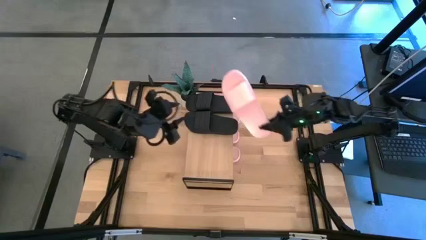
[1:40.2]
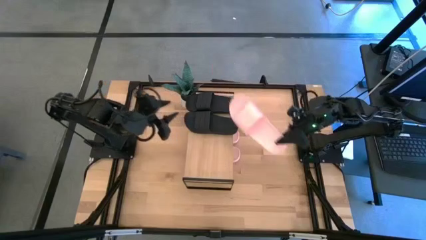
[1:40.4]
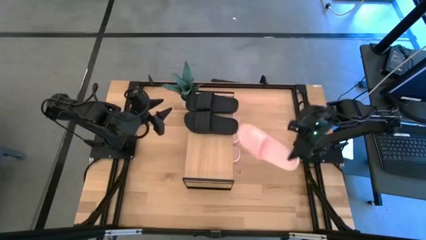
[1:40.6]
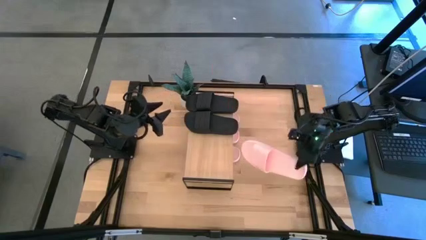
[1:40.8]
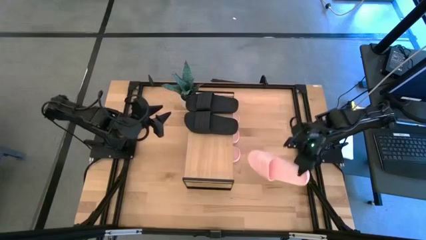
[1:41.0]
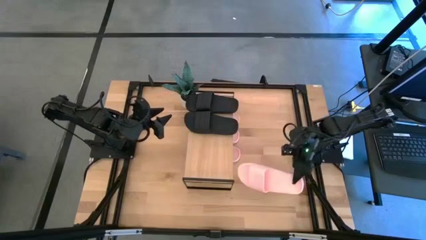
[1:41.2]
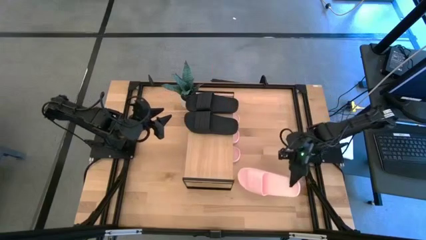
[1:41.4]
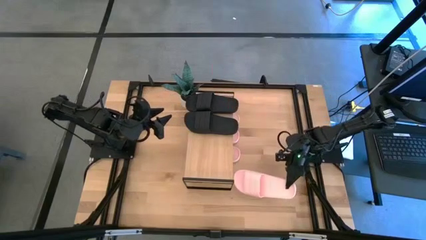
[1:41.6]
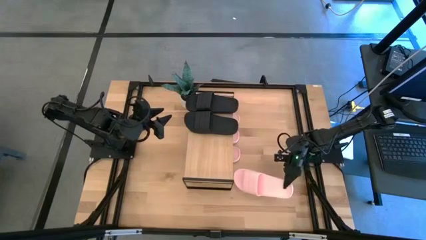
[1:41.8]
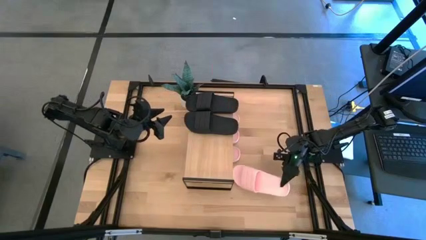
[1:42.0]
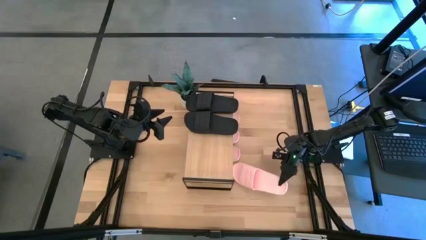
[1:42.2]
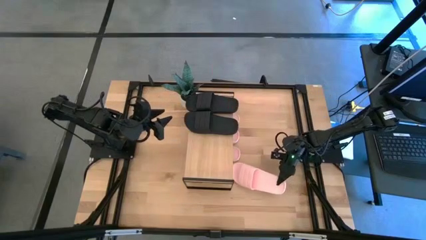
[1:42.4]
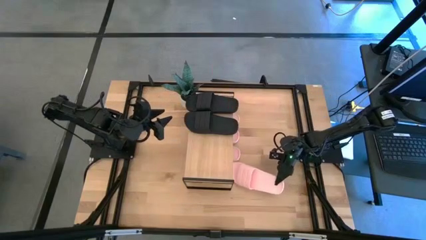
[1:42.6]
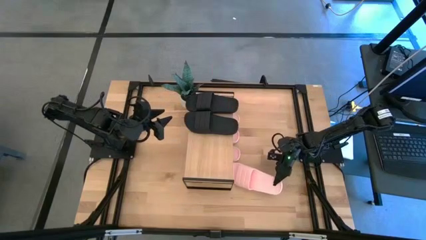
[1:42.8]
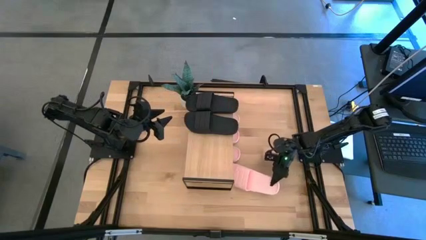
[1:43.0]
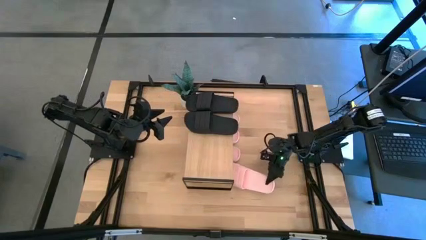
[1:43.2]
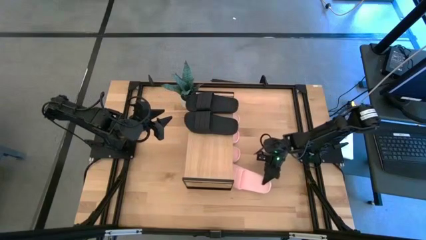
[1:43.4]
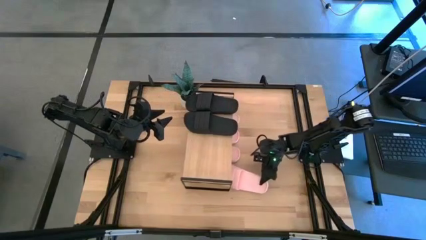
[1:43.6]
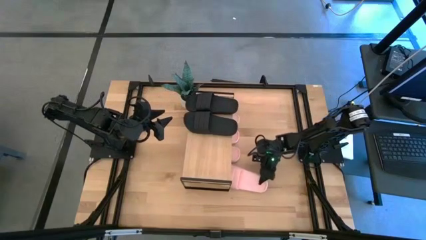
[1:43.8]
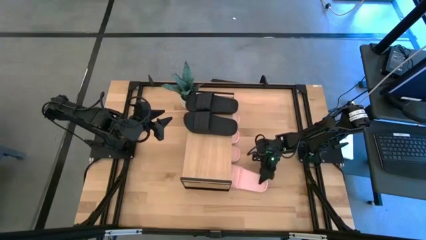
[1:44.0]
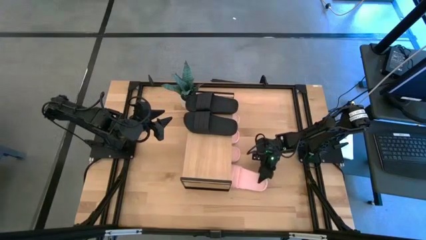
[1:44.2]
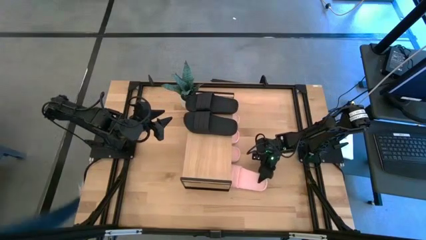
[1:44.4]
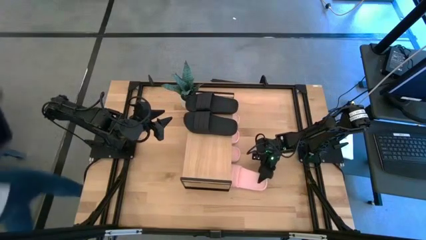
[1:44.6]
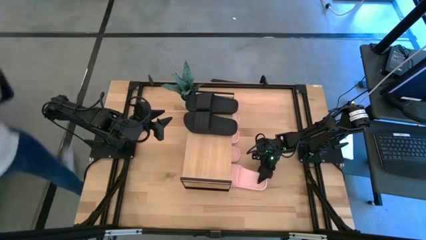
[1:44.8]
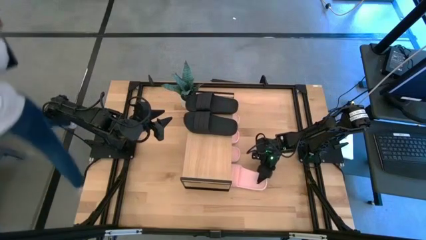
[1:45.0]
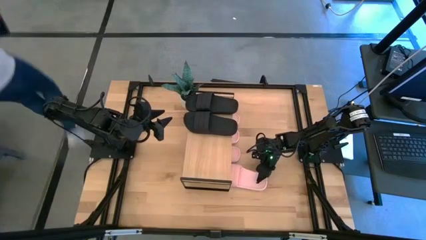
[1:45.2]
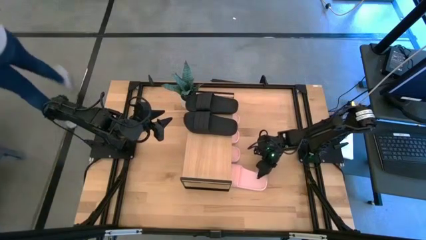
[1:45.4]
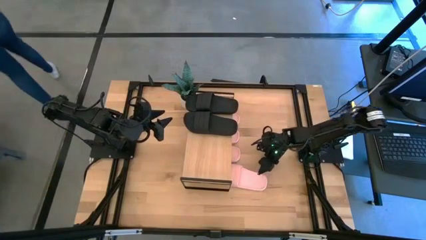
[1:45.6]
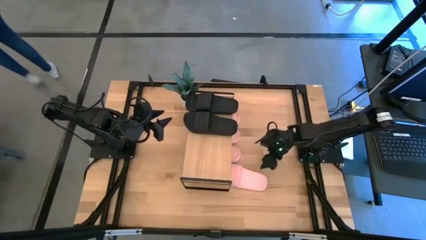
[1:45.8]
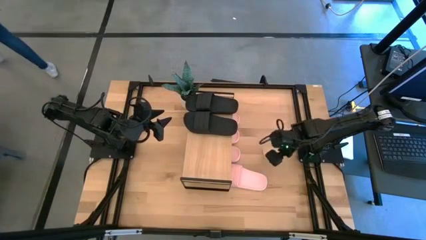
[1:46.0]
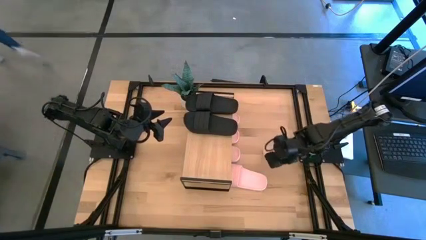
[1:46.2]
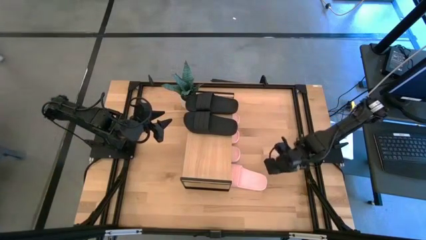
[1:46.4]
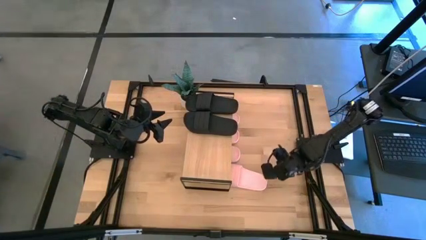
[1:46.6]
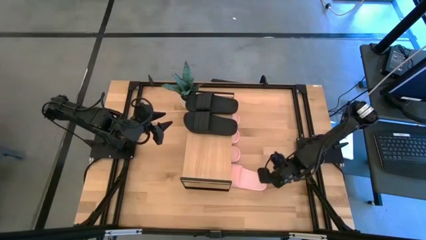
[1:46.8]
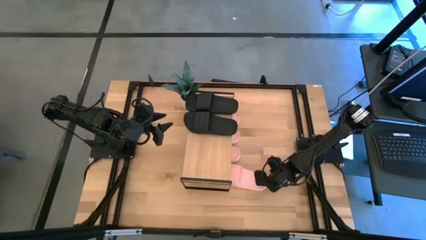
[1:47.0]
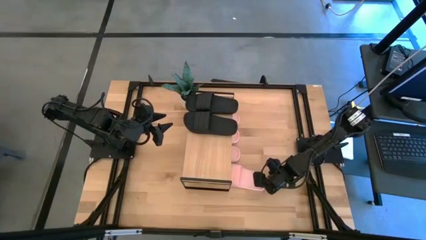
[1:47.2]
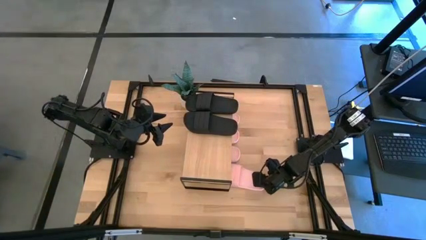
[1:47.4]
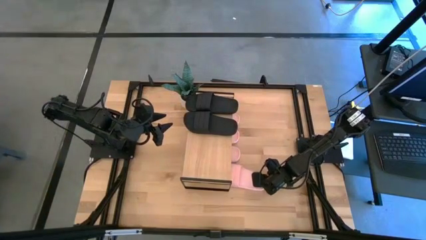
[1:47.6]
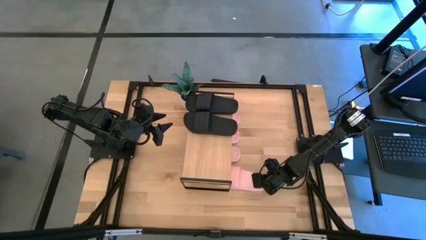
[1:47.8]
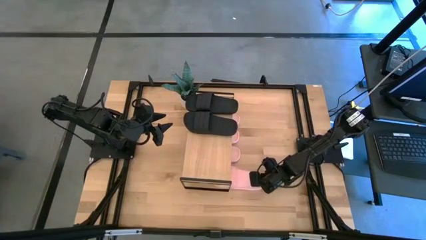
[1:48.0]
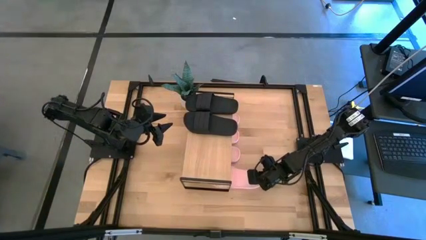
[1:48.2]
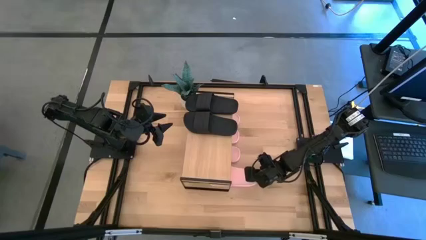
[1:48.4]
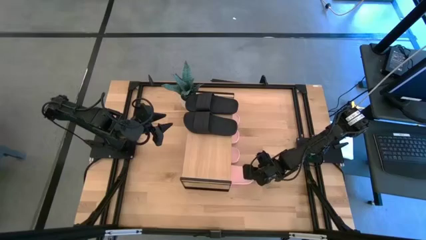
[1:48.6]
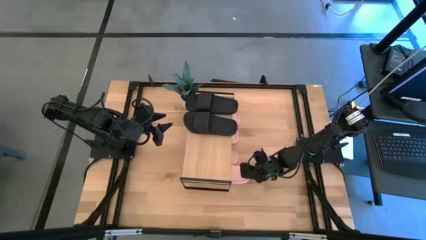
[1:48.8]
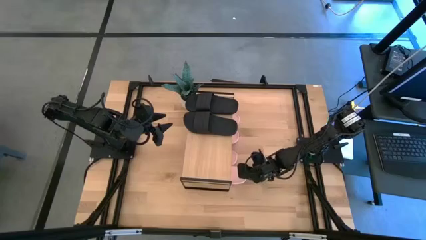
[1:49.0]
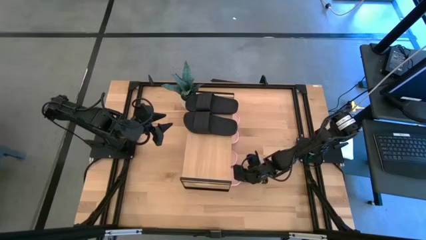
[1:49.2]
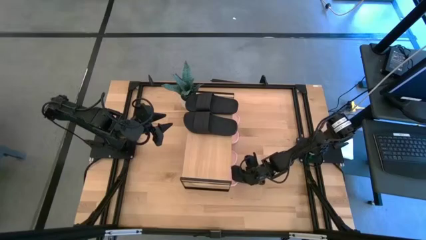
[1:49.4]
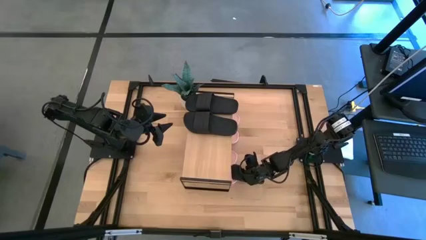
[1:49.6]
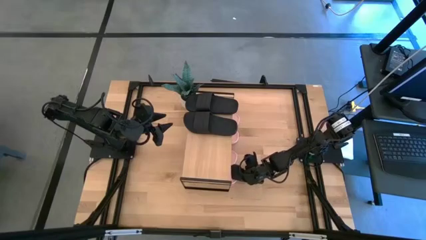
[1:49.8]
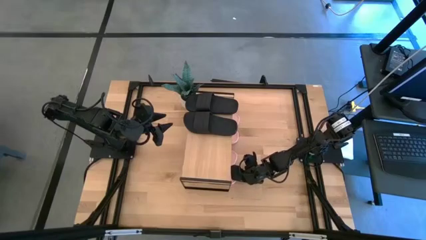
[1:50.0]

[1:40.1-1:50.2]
Task: Pick and place slides into the shelf
Put the pink slide under the shelf

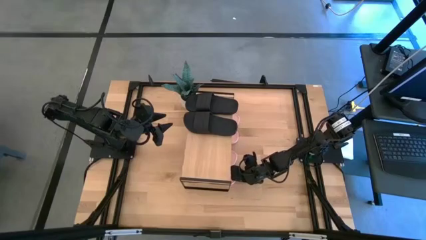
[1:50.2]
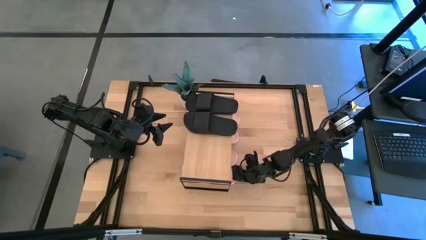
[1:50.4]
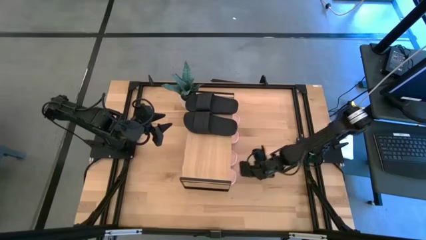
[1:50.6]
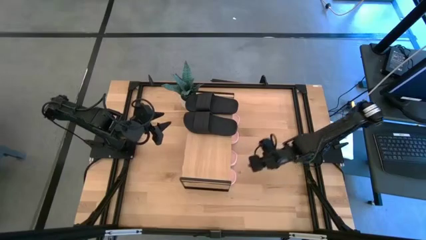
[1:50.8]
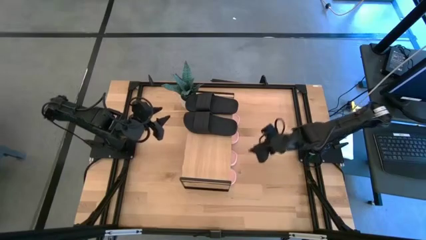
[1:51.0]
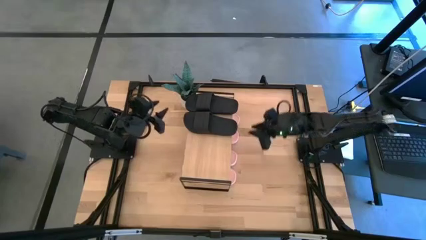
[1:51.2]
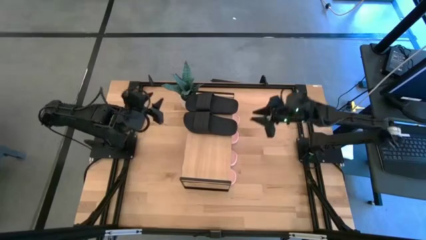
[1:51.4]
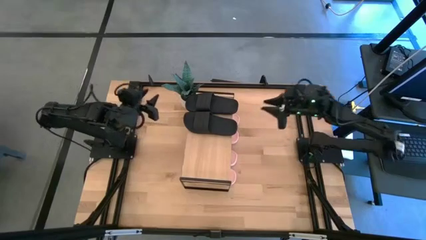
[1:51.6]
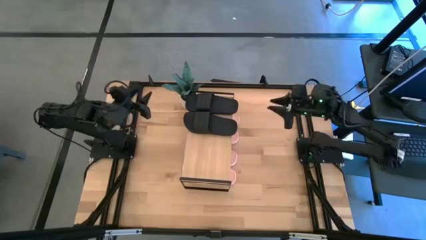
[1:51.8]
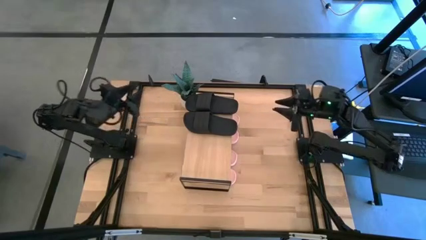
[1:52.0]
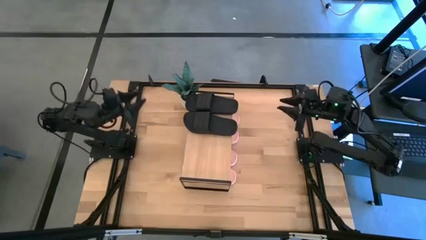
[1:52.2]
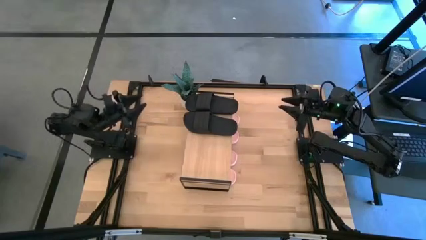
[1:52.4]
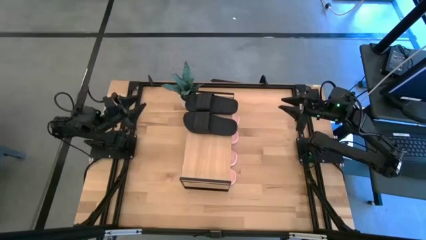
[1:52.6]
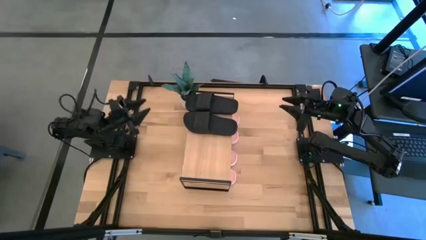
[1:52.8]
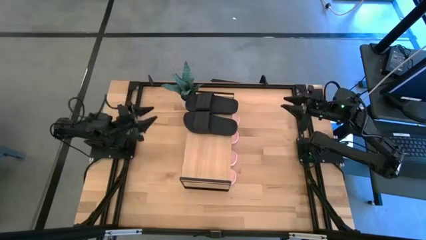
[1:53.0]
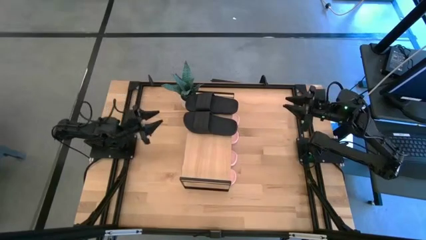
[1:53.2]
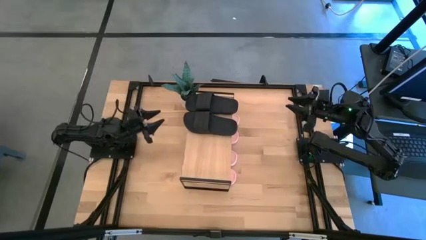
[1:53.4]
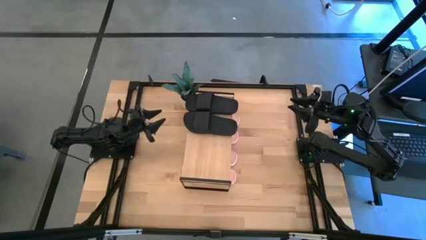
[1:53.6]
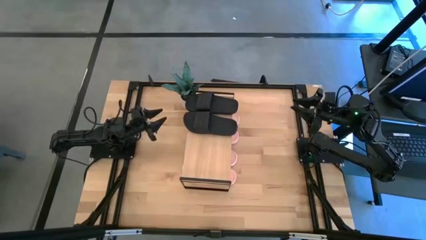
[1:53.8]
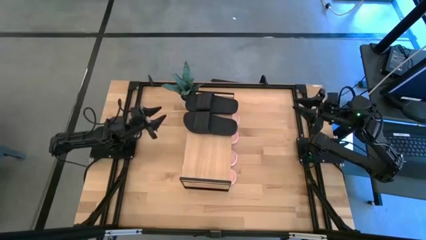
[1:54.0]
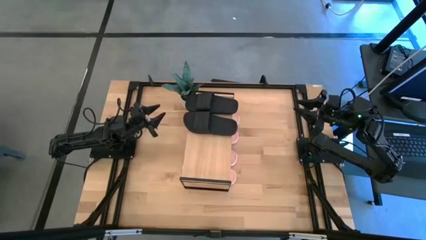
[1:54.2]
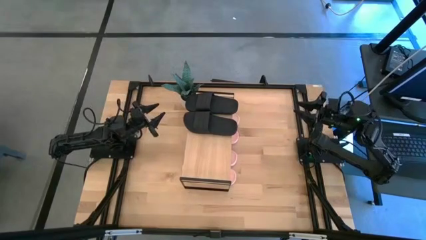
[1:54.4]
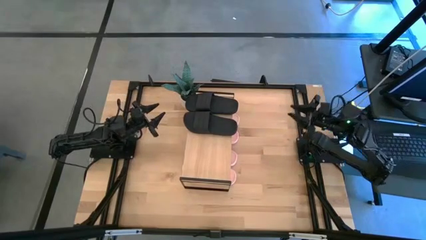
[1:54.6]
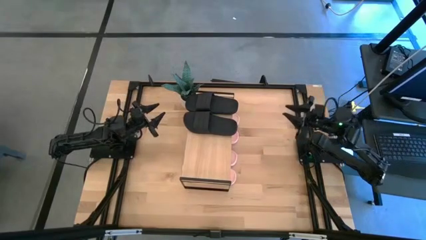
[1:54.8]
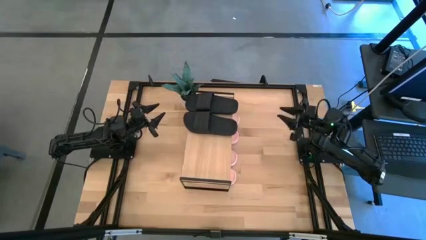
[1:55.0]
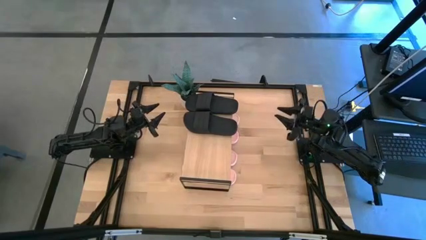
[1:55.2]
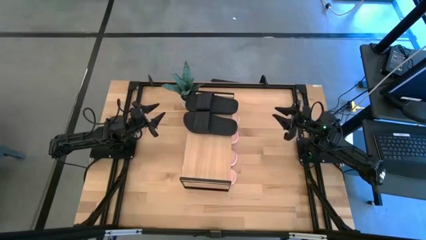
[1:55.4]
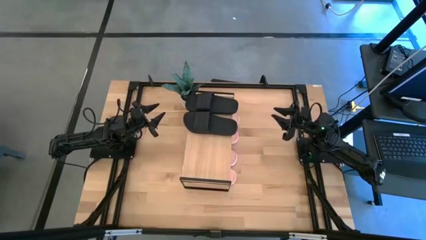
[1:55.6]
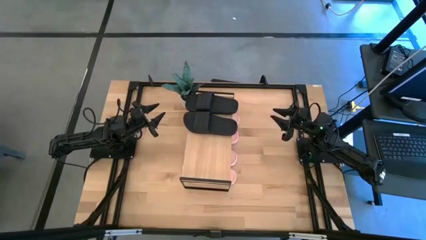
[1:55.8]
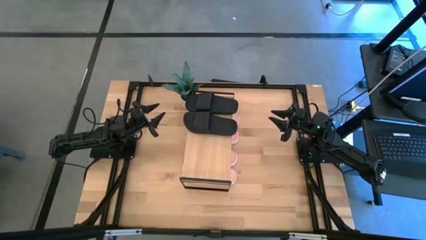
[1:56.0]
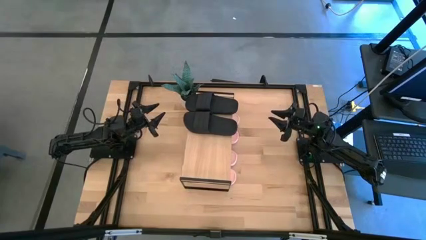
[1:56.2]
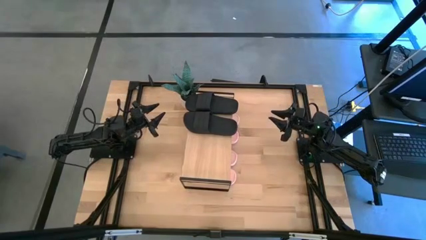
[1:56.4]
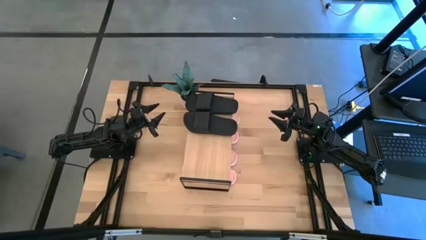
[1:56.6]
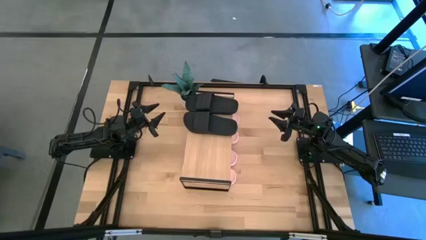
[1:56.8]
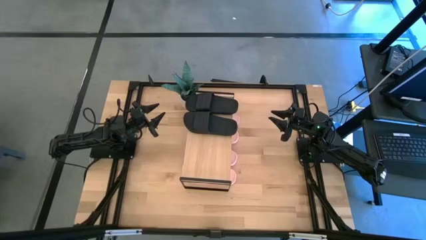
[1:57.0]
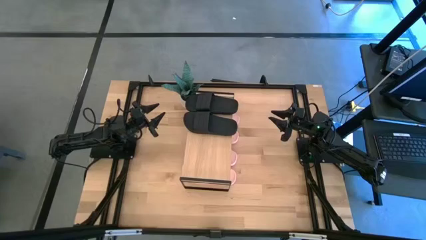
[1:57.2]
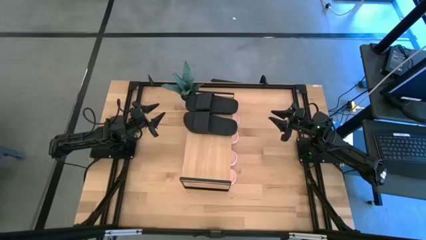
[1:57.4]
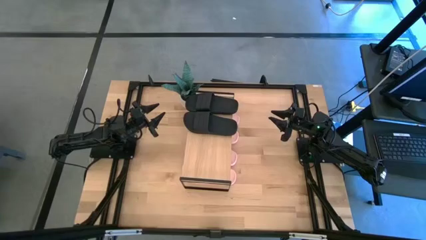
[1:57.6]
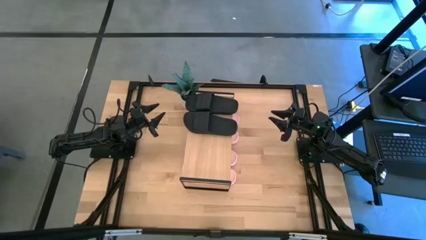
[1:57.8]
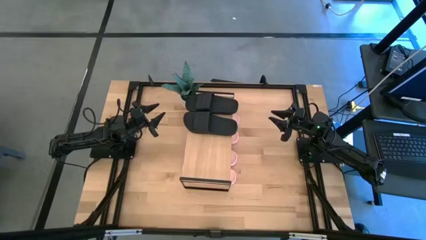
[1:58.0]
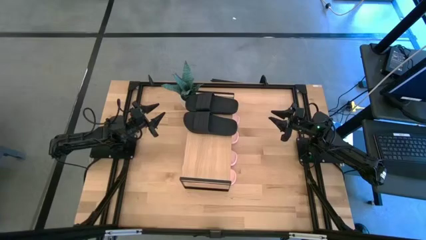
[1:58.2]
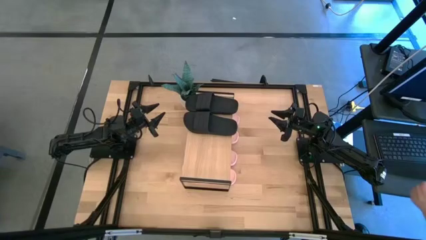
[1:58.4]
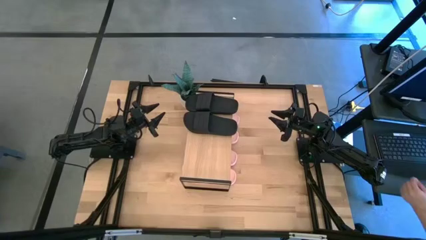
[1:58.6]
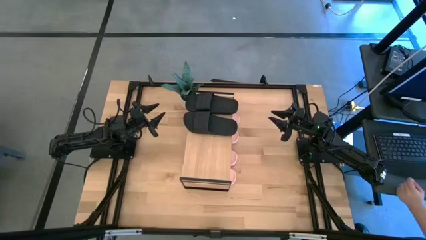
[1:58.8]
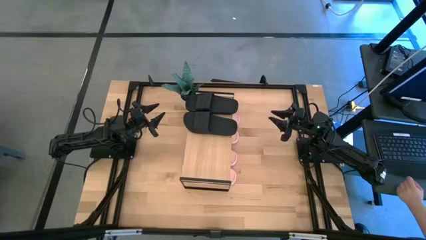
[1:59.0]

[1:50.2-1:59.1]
Return to Home Position
